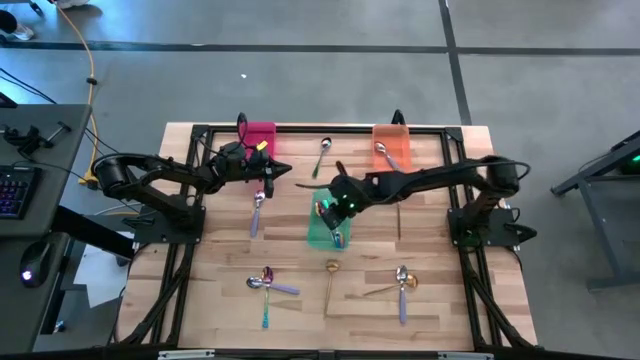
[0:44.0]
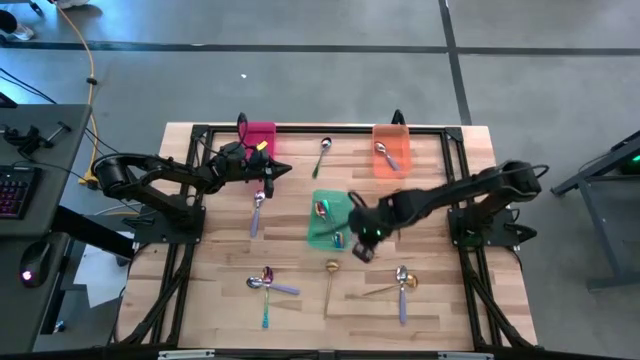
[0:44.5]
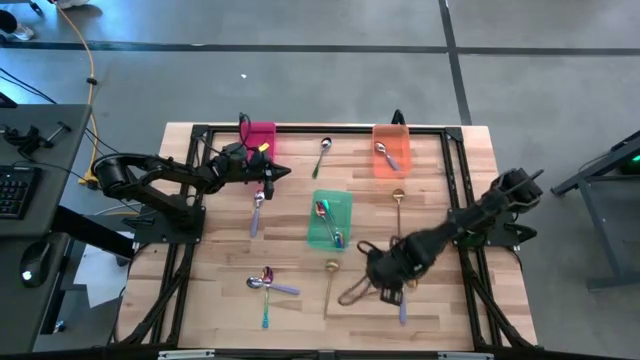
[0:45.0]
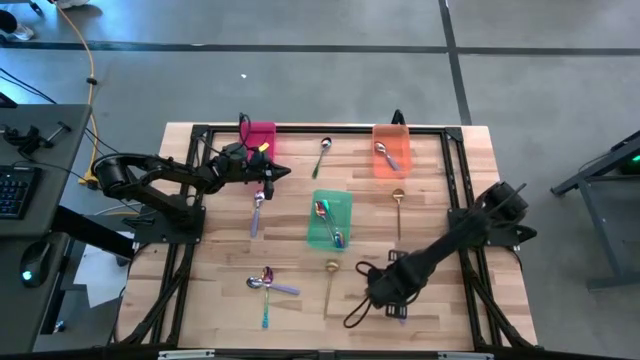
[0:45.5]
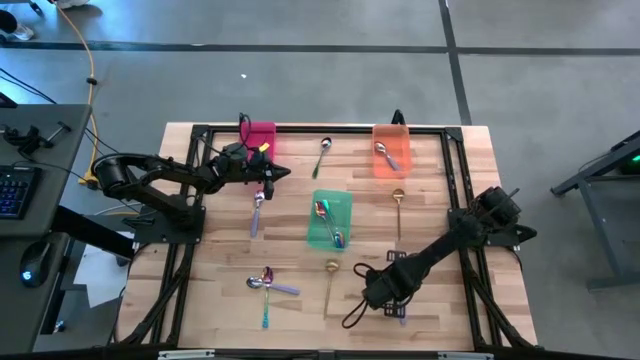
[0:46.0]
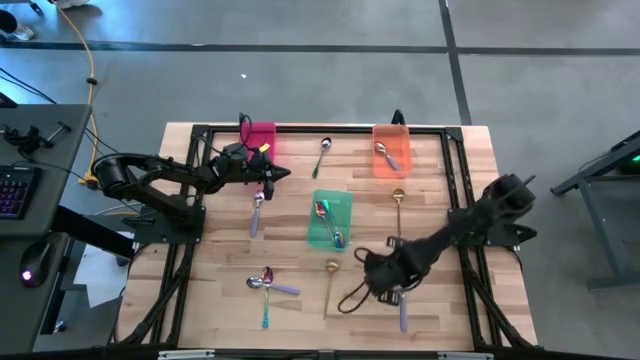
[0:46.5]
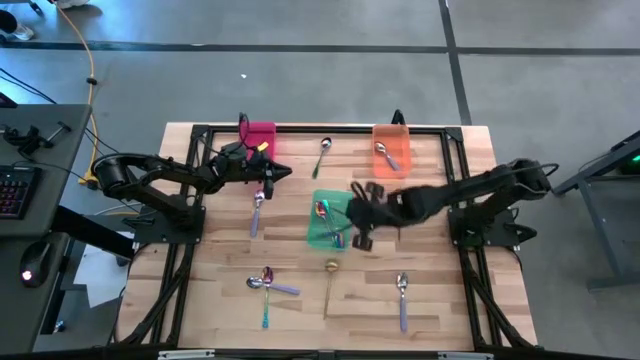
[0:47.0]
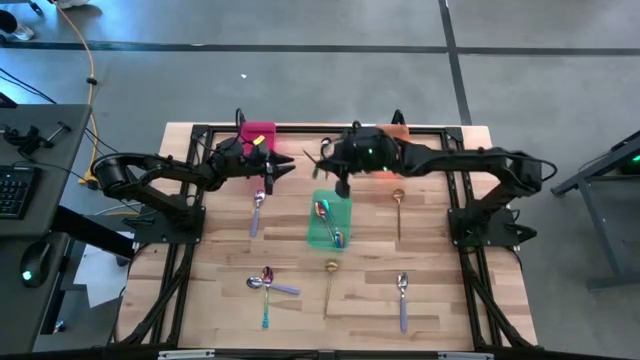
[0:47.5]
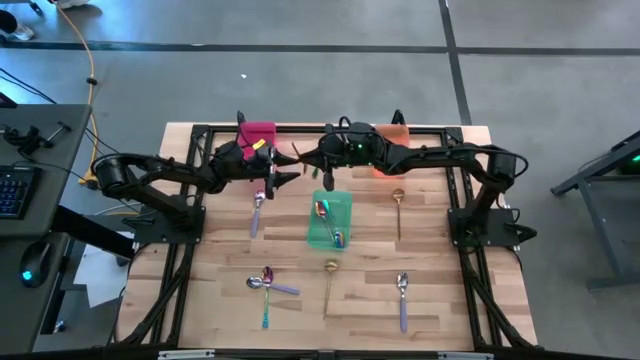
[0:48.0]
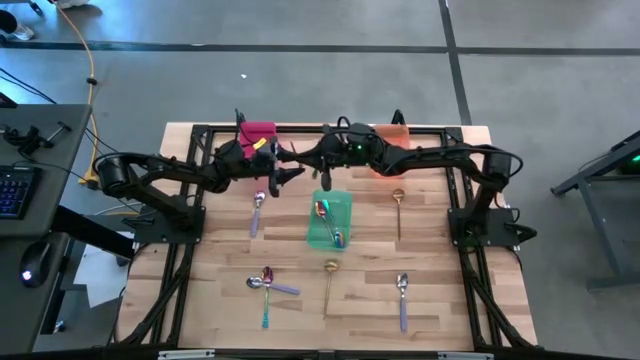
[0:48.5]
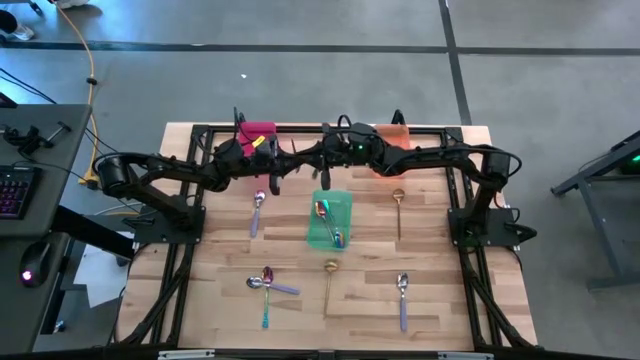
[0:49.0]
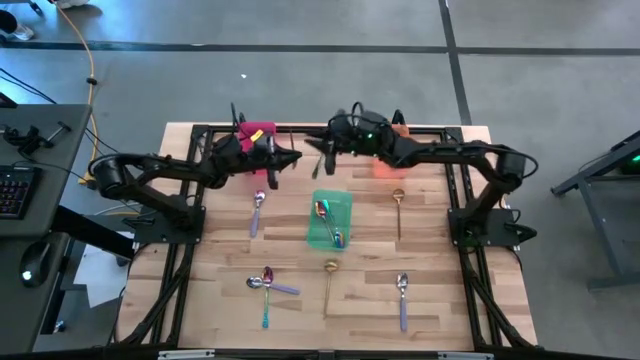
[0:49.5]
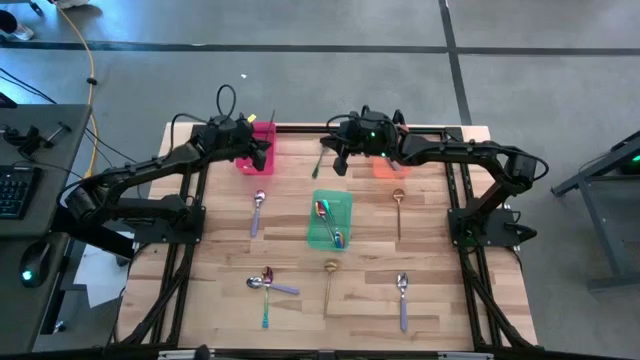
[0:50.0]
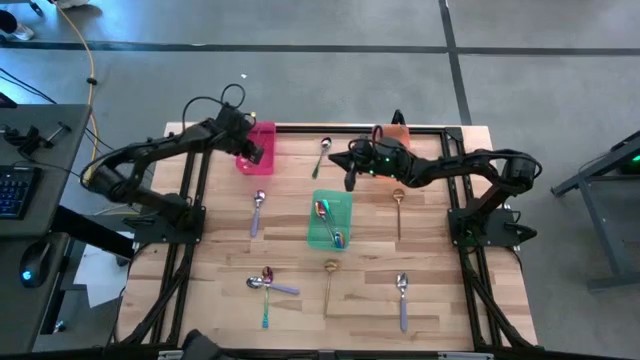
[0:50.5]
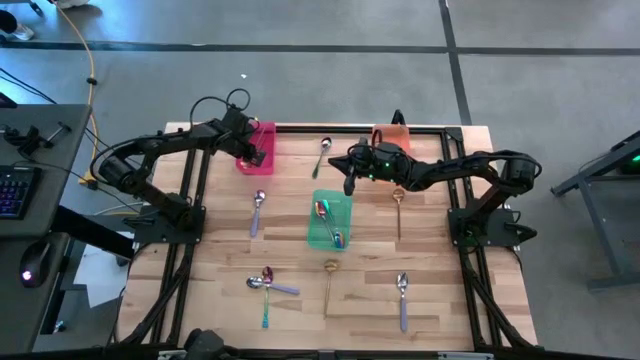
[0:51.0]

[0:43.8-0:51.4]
Task: Sort silverware by color (type)
Put the bottom right gold spoon into the pink bin

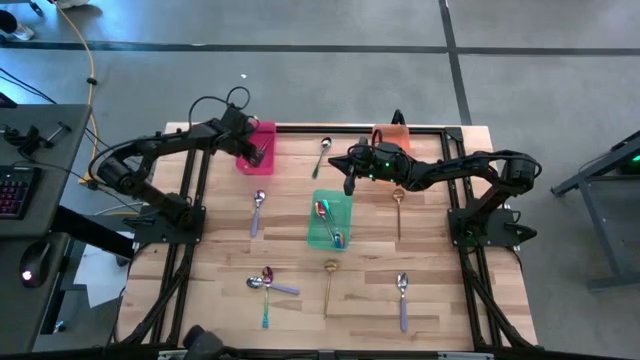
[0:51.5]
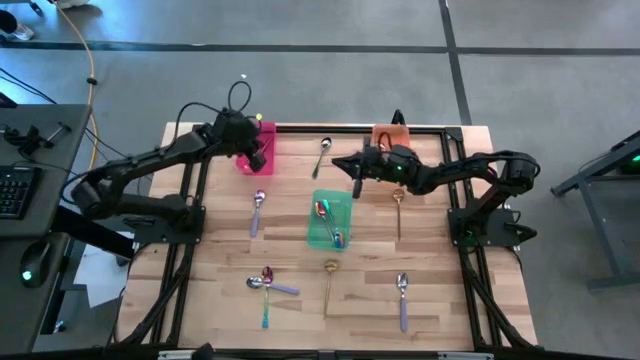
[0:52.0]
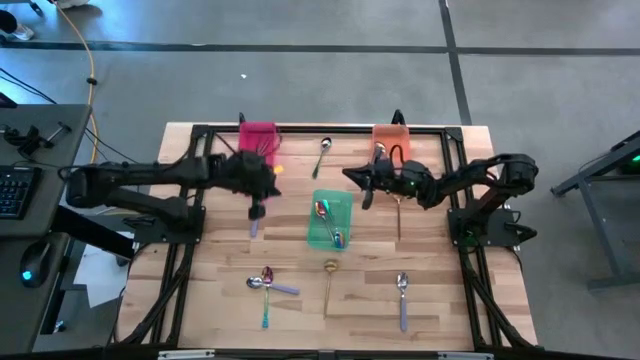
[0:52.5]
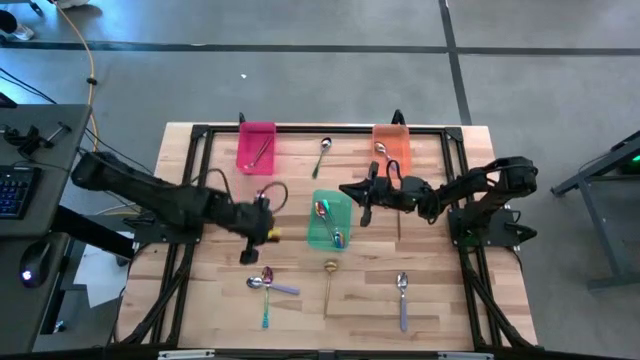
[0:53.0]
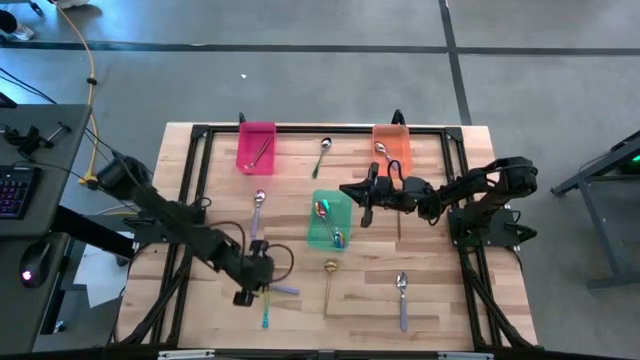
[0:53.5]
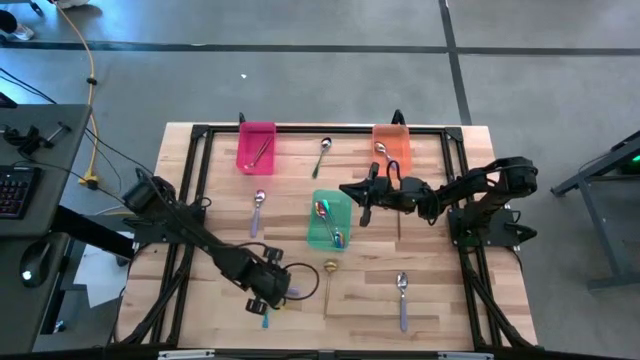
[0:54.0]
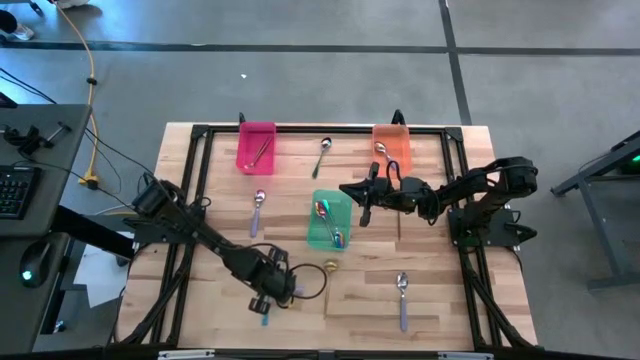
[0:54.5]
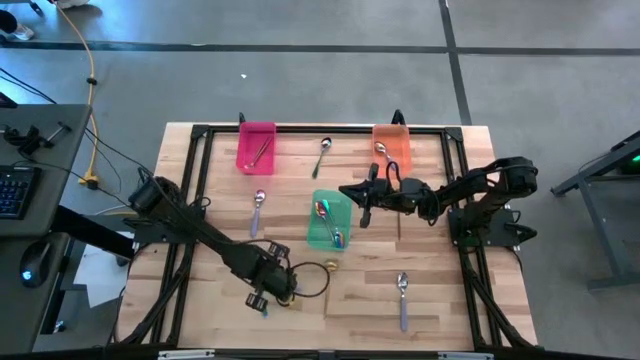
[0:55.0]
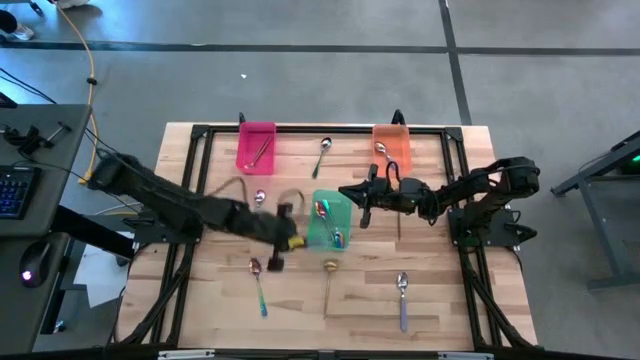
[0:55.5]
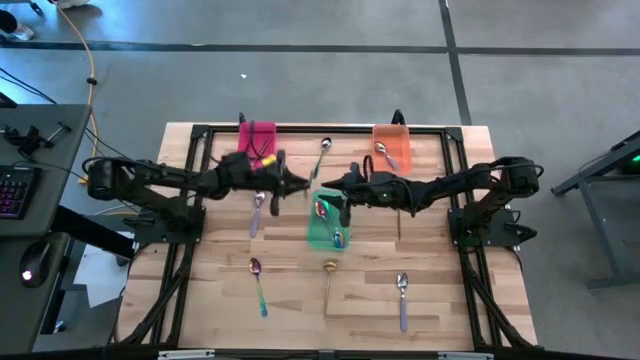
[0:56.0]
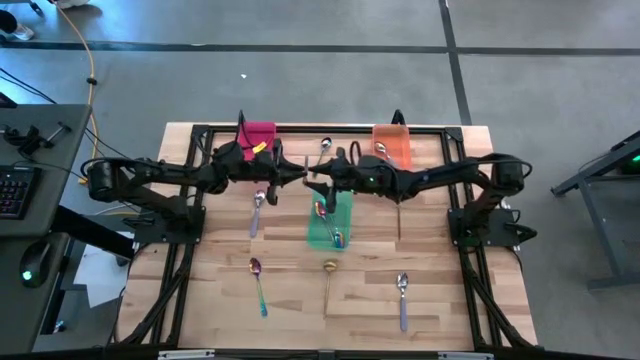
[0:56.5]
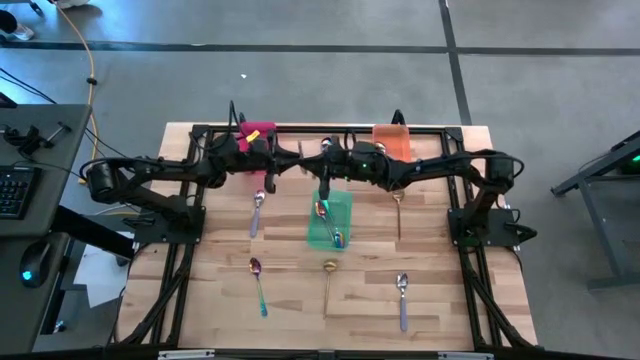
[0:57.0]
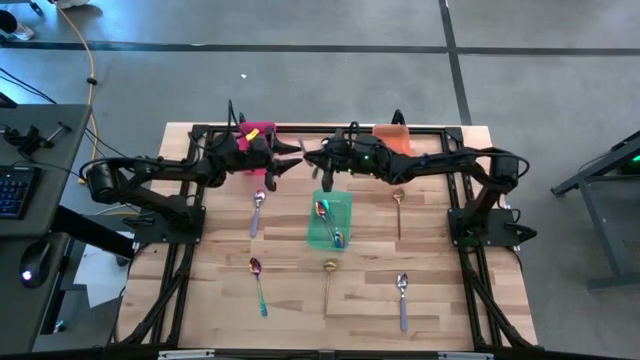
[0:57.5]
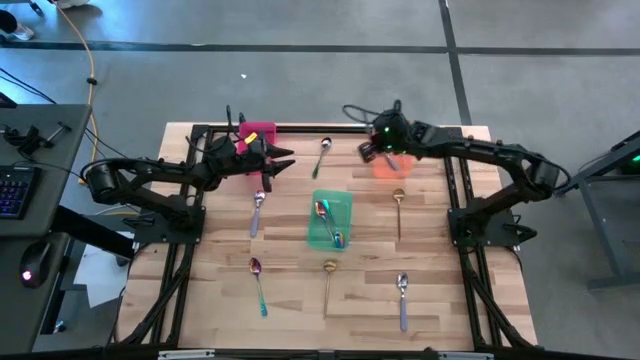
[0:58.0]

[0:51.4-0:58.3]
Put the bottom left purple spoon into the orange bin

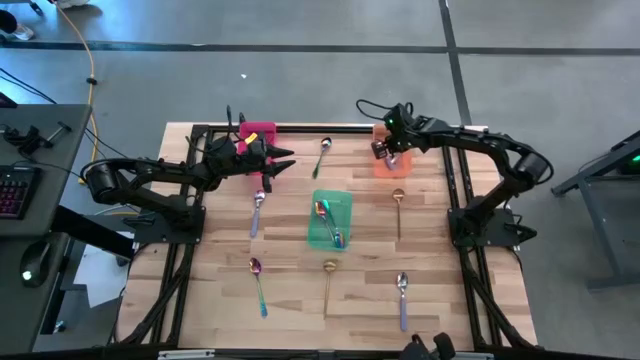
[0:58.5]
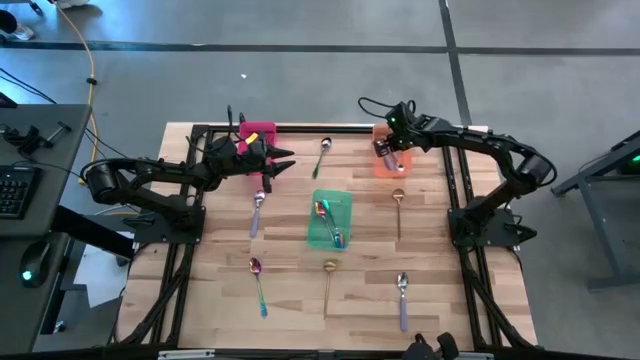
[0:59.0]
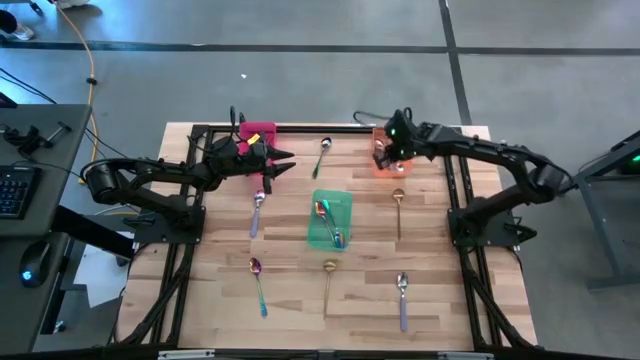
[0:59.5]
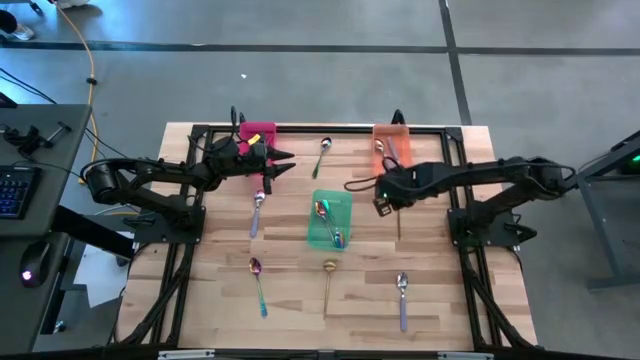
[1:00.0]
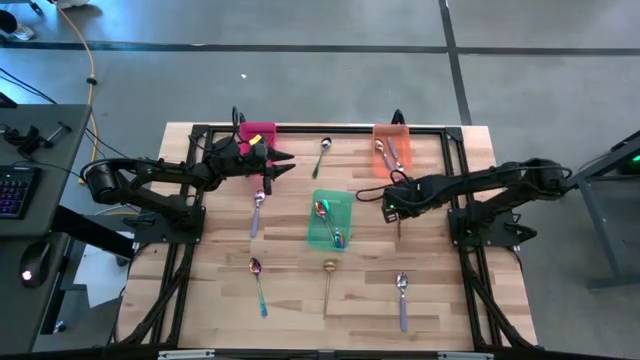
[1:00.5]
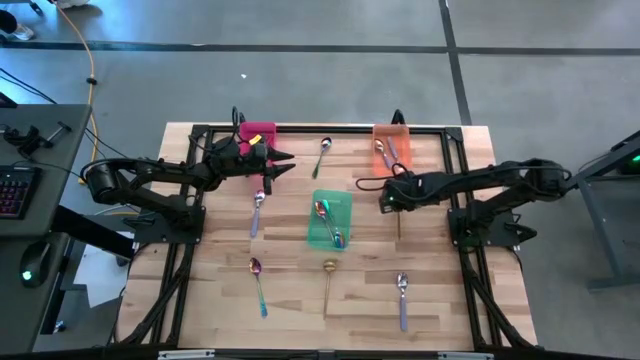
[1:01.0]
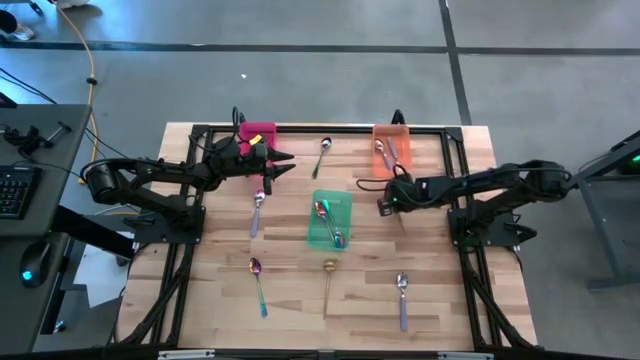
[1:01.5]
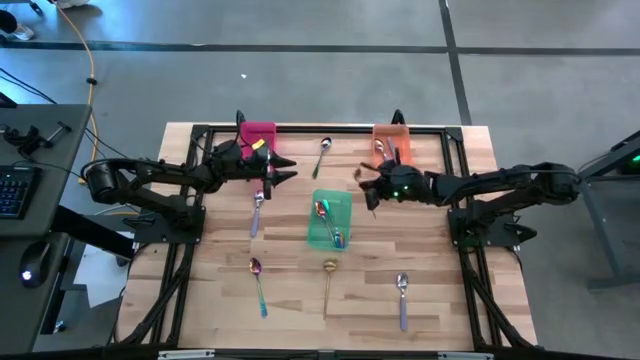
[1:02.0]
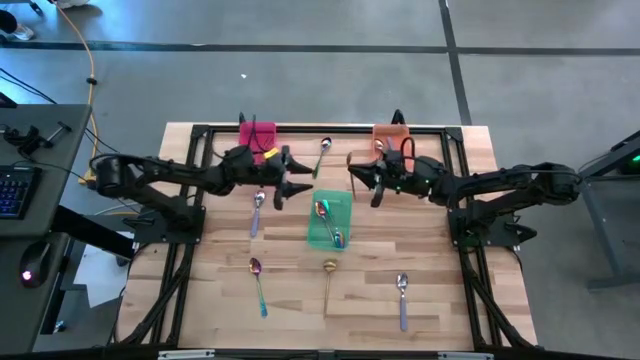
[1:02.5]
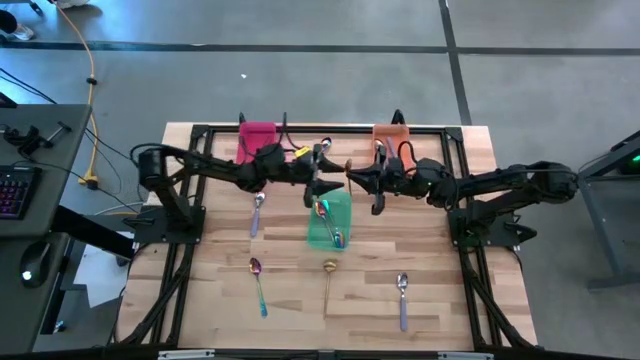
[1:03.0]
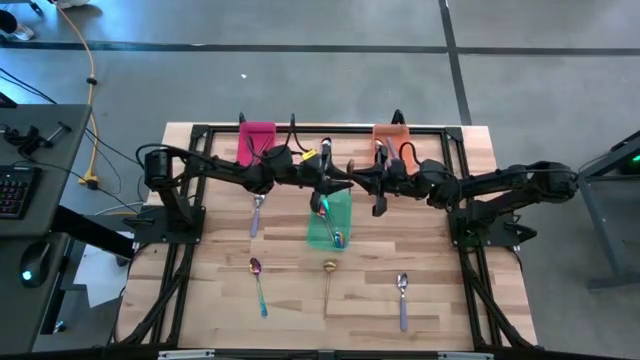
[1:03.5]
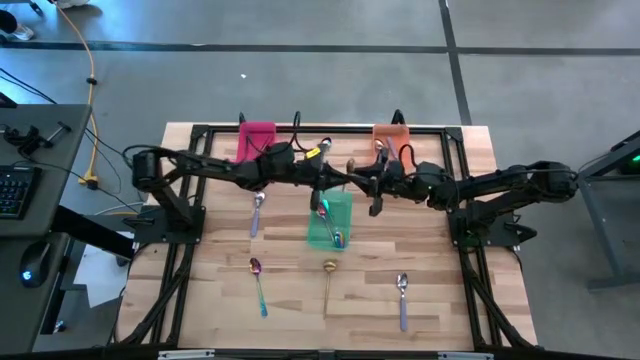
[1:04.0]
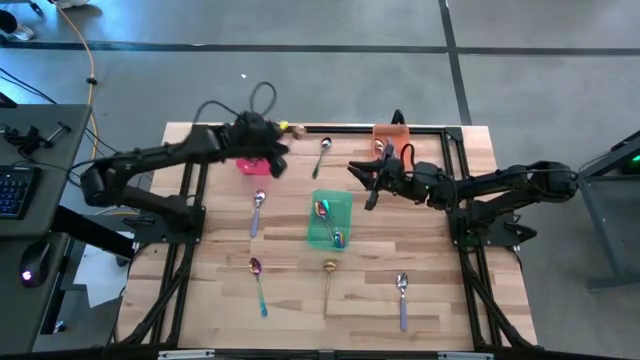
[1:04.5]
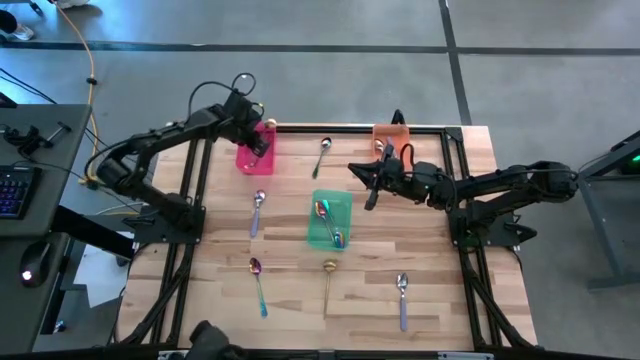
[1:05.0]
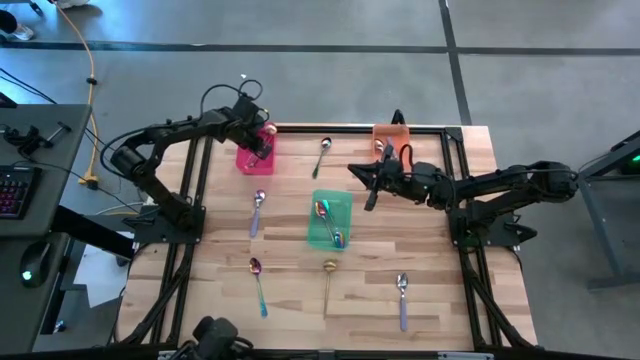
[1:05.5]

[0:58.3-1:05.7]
Put the top gold spoon in the pink bin
